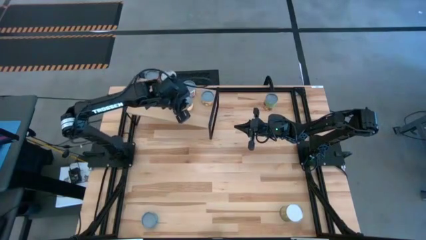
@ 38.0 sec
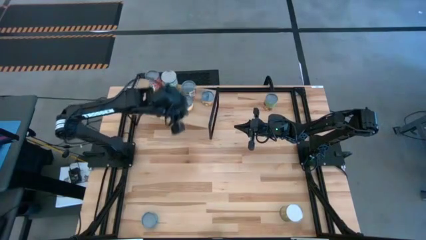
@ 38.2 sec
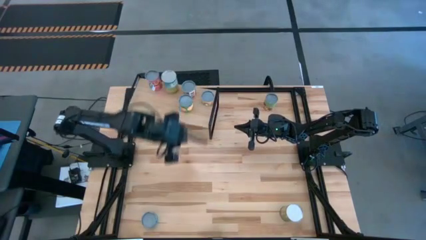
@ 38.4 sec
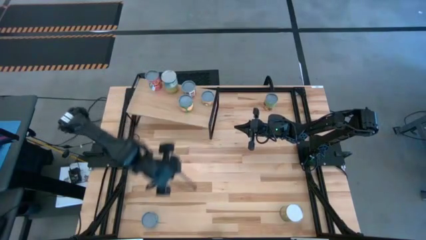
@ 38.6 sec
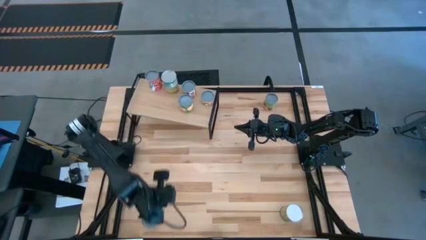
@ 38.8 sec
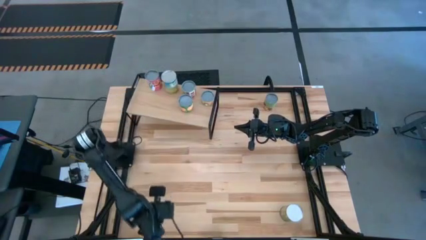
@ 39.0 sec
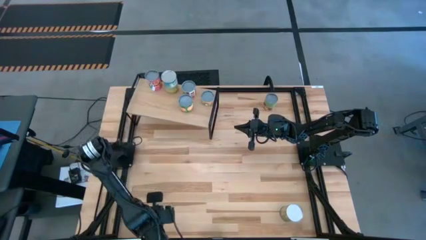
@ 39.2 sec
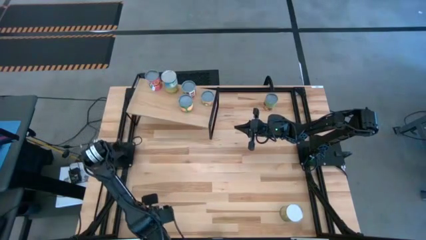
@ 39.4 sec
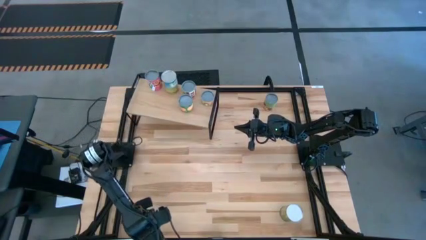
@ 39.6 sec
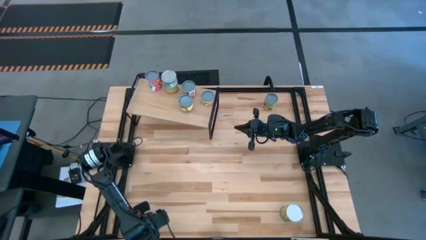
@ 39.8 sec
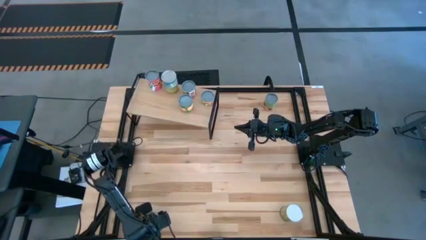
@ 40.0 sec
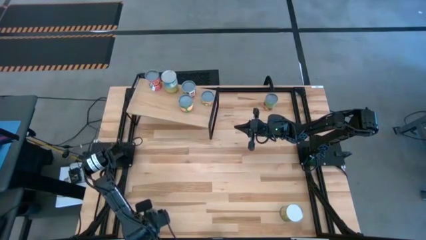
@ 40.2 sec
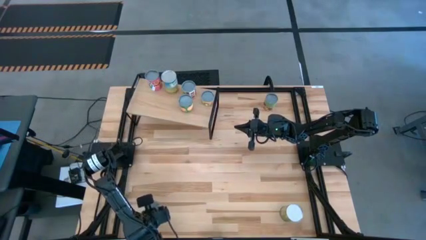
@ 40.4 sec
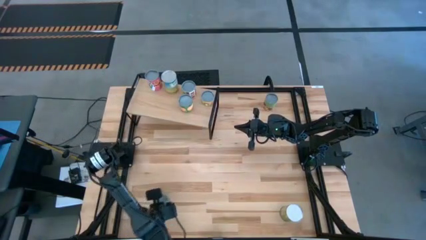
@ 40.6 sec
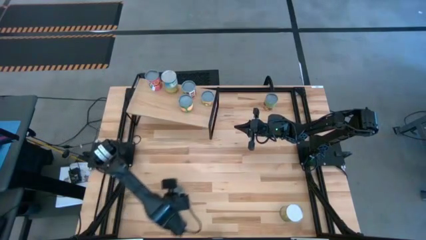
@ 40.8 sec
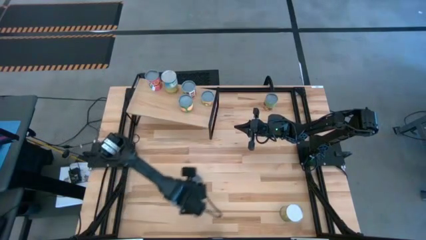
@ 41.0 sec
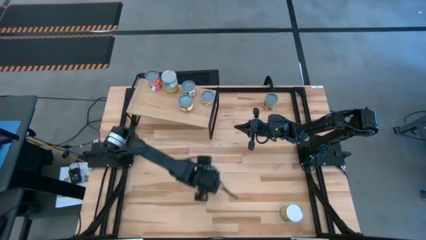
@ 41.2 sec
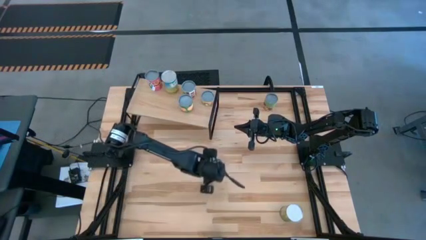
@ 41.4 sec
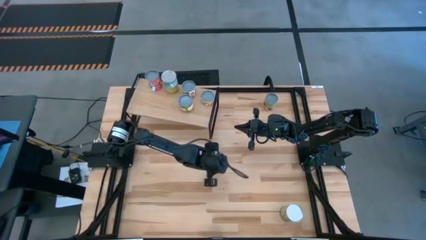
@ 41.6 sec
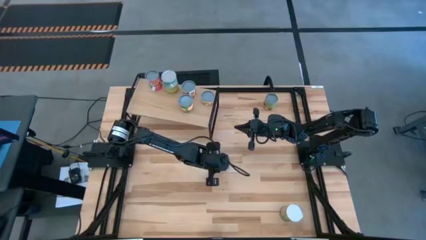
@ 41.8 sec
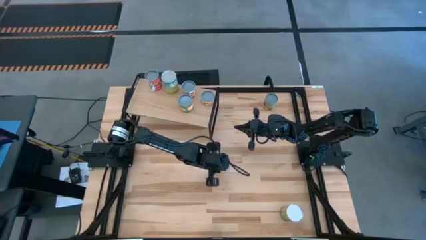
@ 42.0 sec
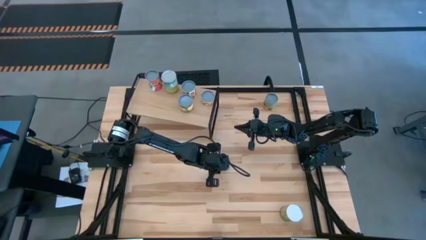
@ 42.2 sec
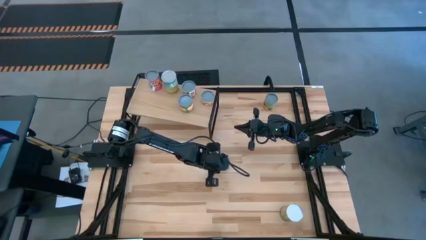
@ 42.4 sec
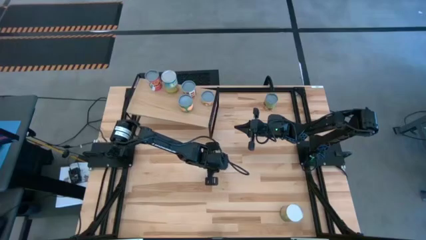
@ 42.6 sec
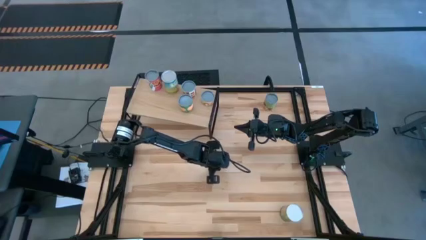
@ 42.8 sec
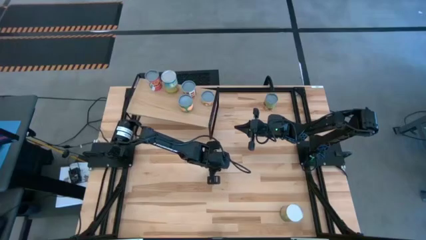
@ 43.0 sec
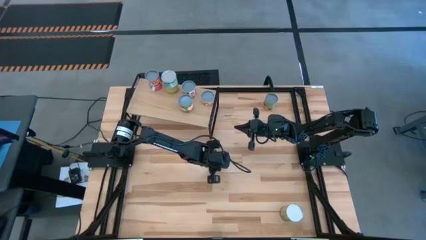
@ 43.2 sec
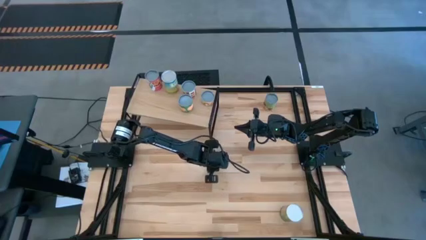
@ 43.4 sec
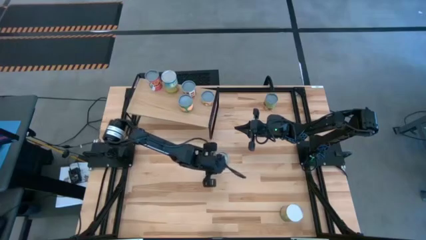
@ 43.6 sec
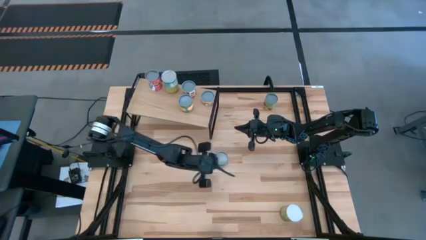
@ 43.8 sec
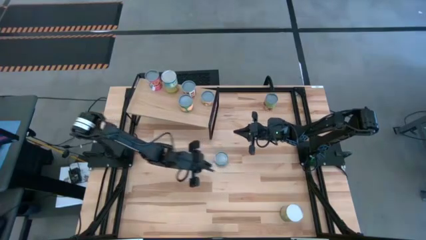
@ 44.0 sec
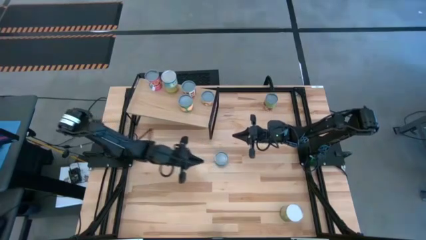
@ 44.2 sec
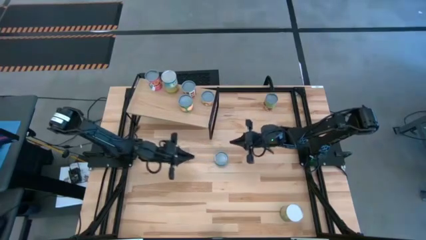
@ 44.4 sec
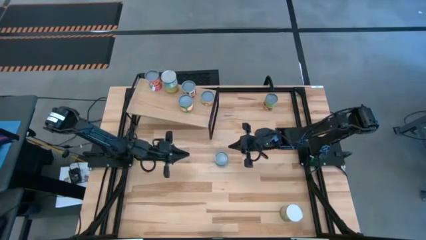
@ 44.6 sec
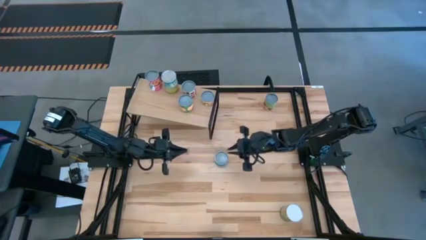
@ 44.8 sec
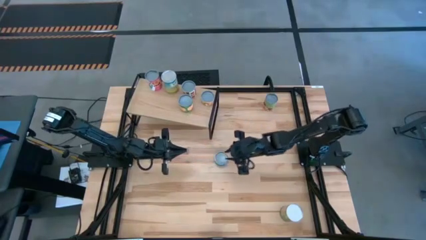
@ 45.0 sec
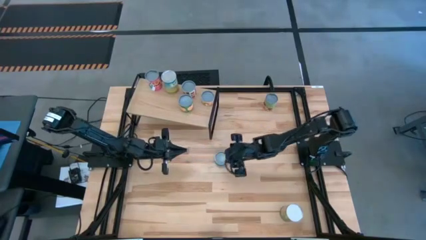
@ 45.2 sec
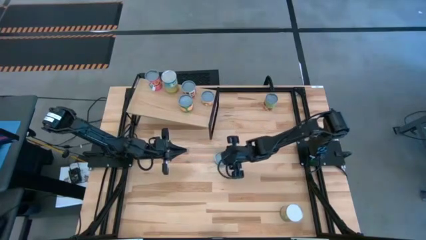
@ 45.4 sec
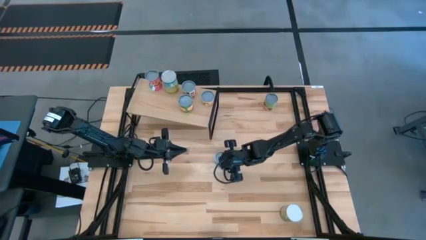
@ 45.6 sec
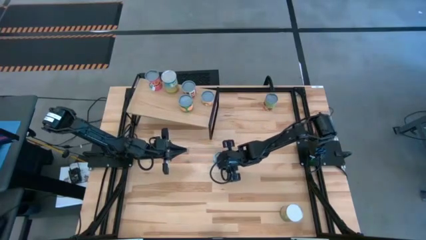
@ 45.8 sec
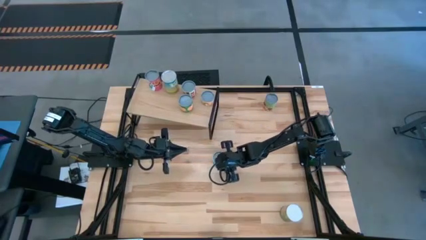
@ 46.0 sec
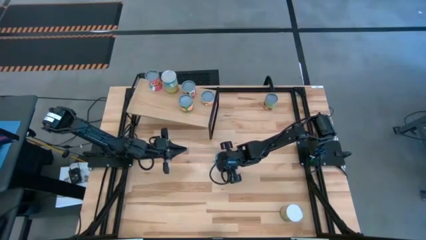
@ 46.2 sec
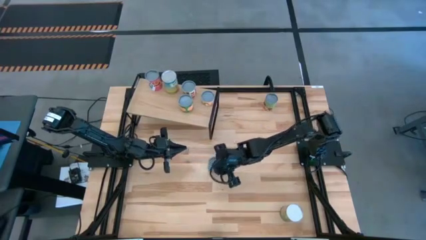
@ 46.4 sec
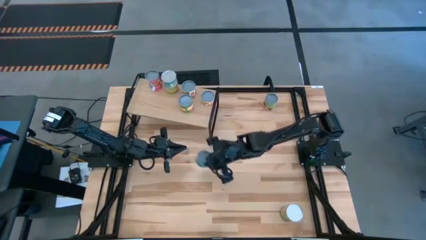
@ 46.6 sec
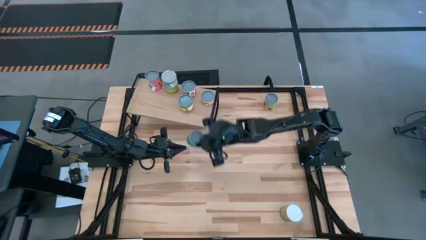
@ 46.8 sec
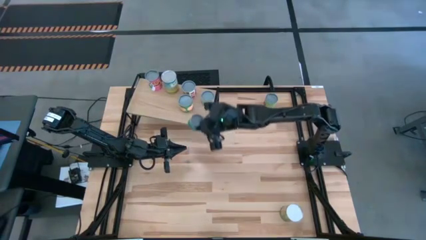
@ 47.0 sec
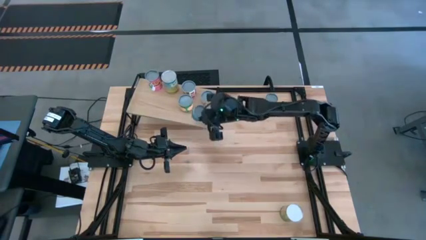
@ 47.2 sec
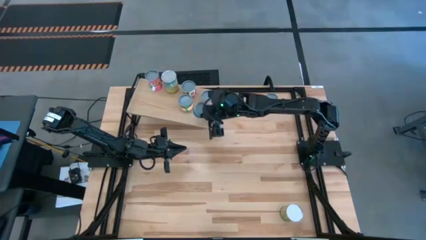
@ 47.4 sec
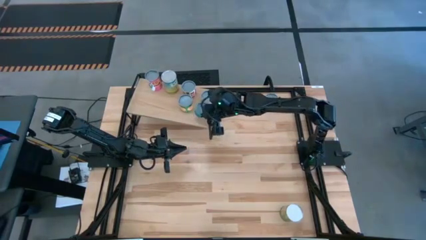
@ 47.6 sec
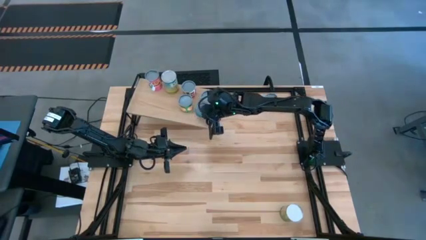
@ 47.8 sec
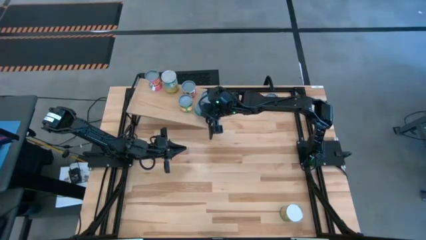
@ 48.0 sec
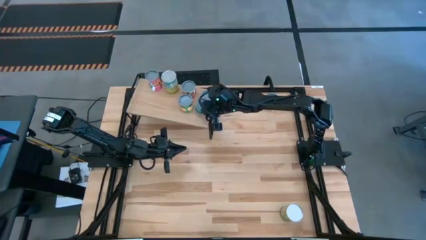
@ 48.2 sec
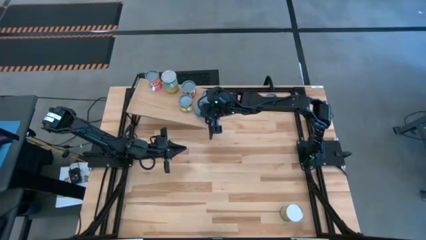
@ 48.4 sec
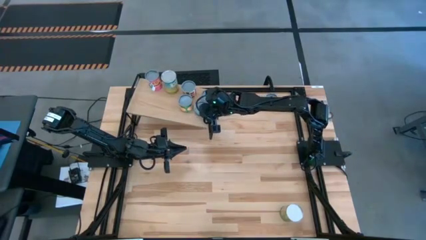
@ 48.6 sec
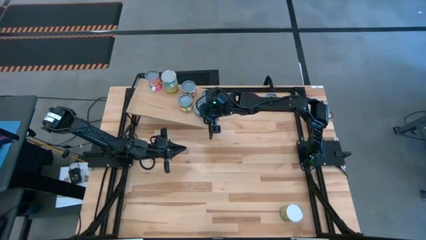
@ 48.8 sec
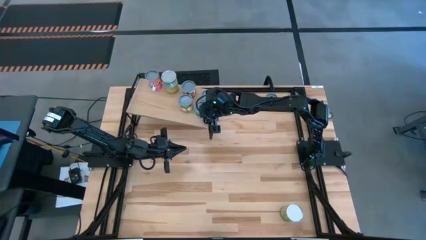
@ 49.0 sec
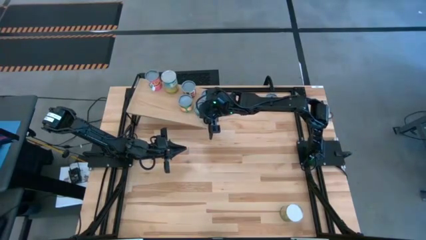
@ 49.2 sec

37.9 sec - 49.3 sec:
Task: Pick and place cans onto a shelf
Put the canned tuna on the shelf

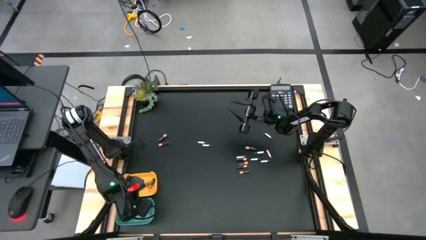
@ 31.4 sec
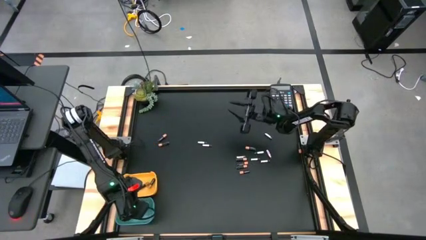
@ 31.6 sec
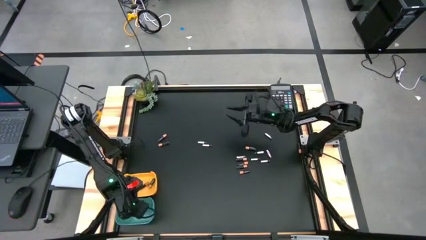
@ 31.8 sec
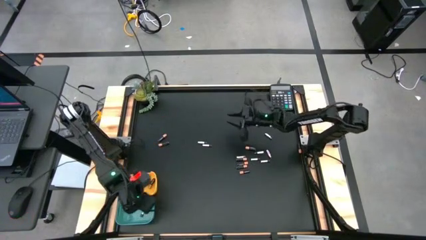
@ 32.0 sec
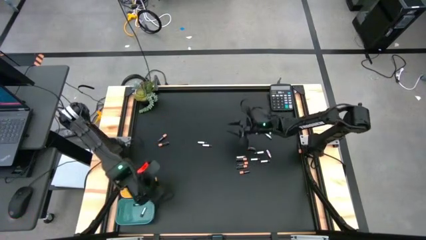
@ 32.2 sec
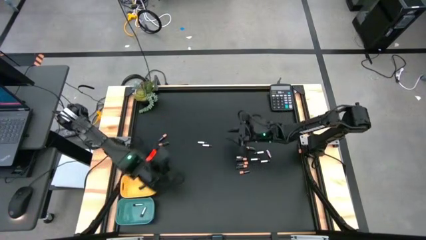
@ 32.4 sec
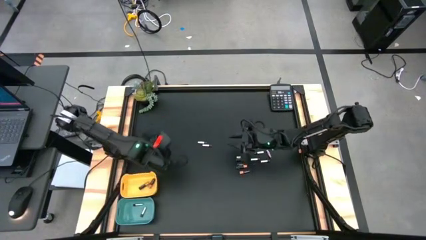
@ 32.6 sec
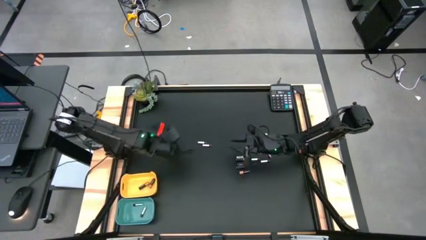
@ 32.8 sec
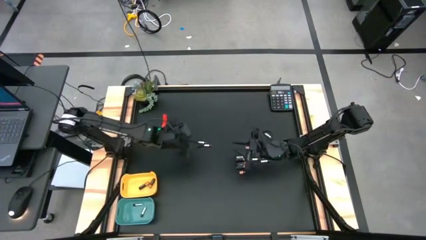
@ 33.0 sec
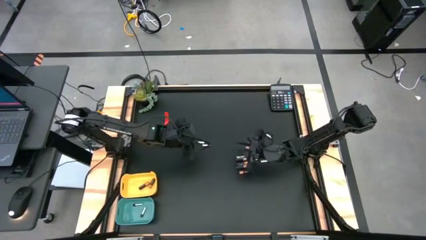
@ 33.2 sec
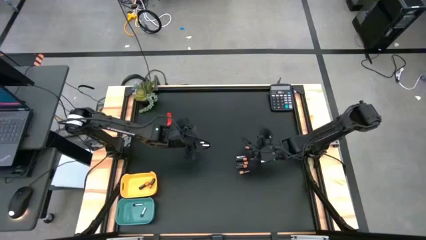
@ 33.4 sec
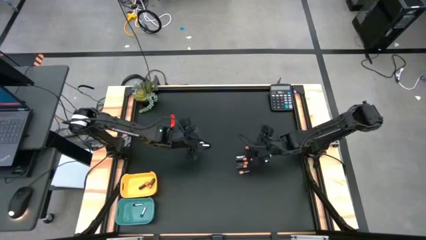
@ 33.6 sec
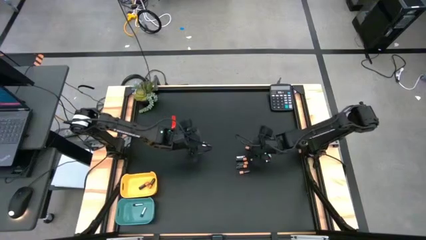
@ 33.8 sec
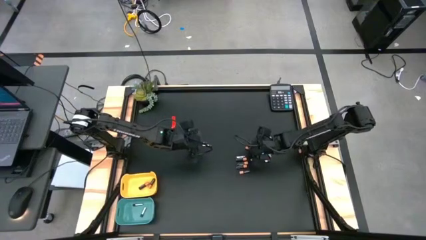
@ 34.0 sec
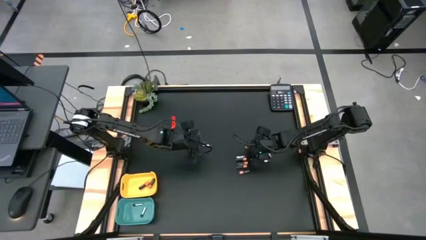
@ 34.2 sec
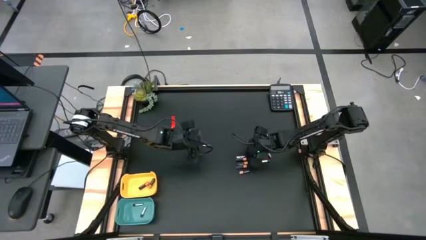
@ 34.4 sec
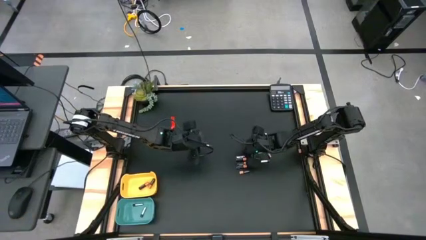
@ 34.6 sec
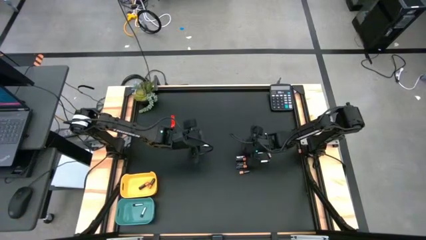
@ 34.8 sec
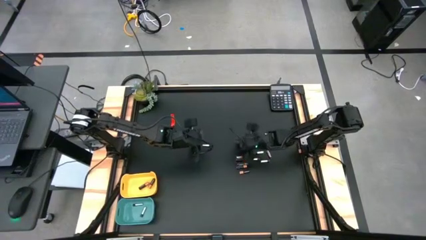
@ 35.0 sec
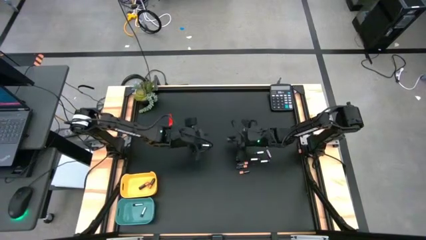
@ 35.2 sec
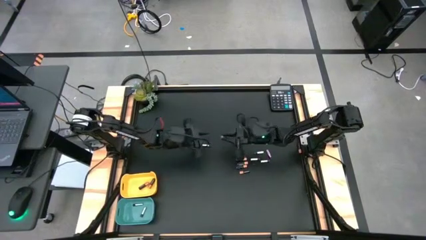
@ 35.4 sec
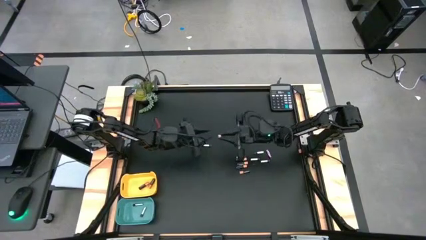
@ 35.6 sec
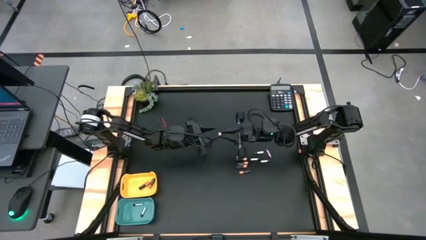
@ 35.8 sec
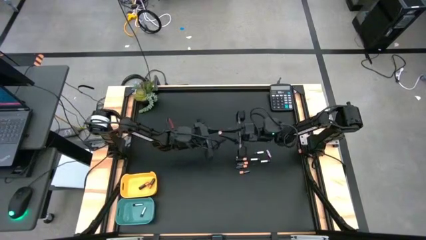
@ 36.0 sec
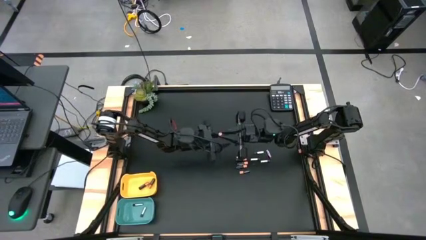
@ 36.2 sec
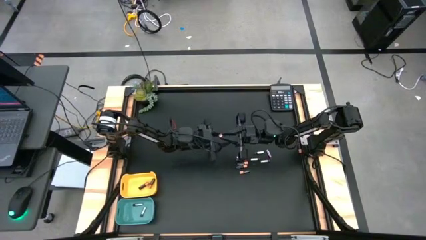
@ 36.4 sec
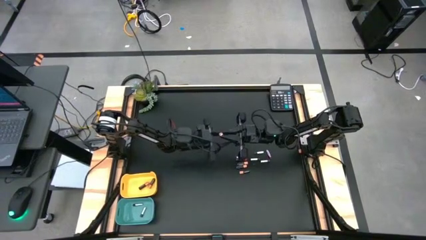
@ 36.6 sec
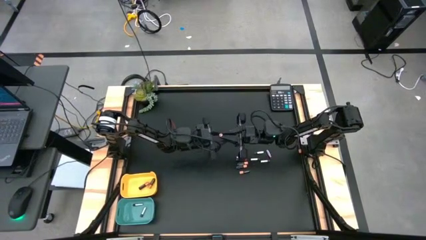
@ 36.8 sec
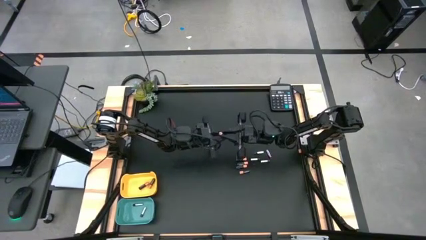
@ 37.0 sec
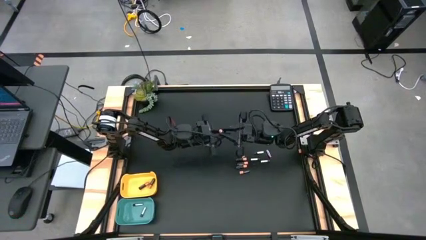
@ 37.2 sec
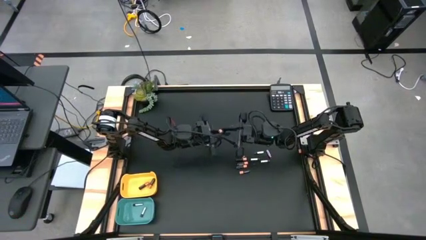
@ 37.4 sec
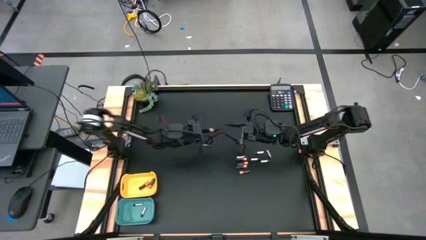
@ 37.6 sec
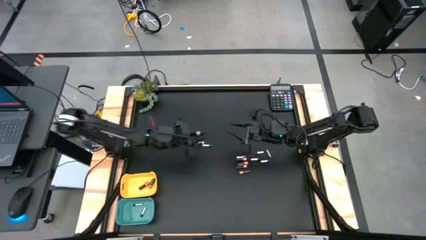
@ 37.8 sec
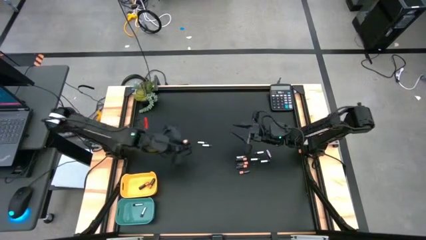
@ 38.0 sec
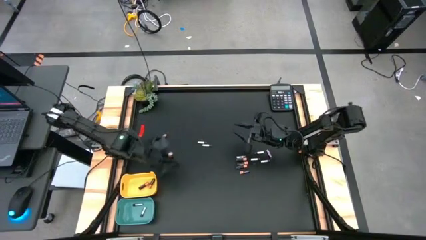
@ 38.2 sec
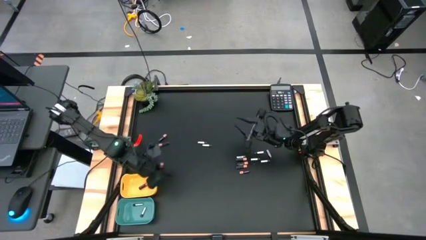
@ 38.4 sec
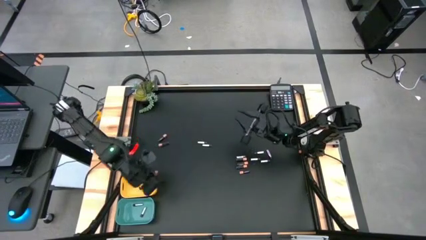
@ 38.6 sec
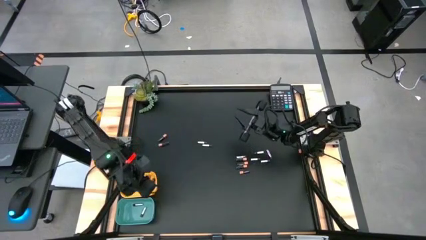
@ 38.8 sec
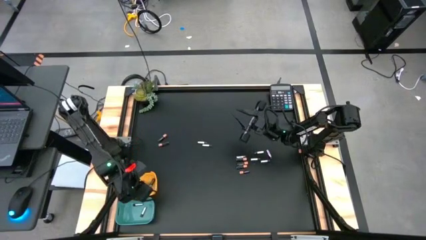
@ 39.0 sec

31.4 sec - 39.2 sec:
Task: Sort batteries
Put the black battery into the yellow bin
